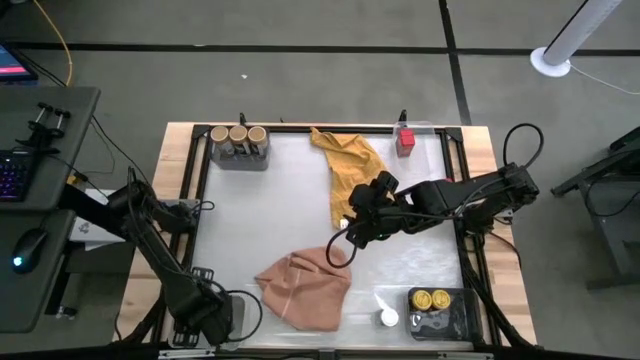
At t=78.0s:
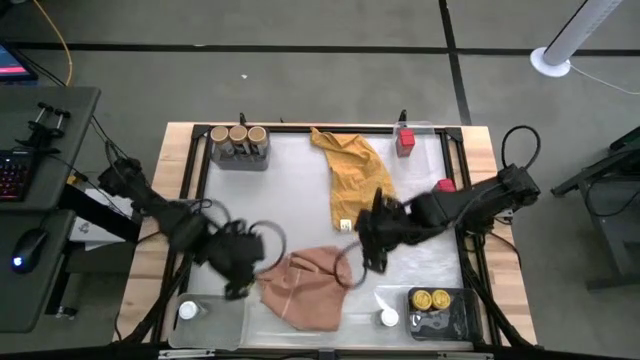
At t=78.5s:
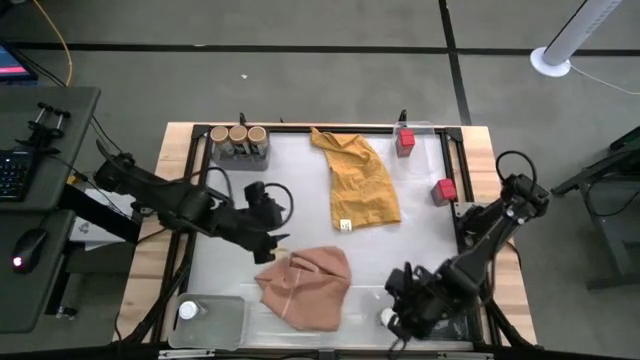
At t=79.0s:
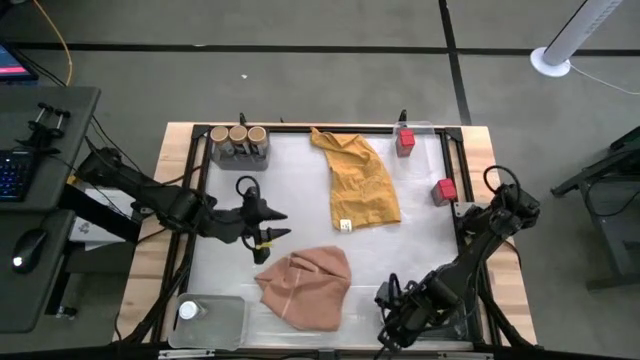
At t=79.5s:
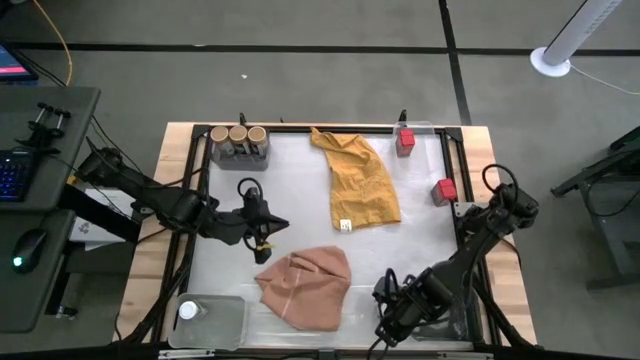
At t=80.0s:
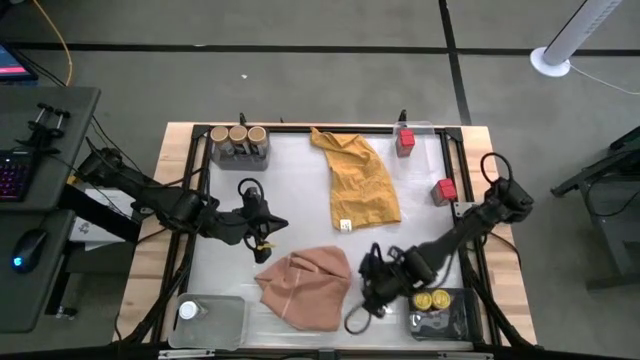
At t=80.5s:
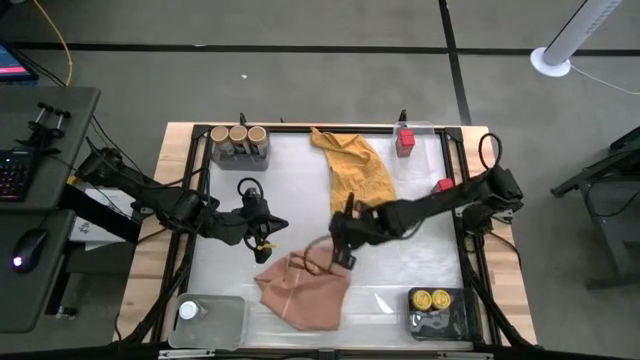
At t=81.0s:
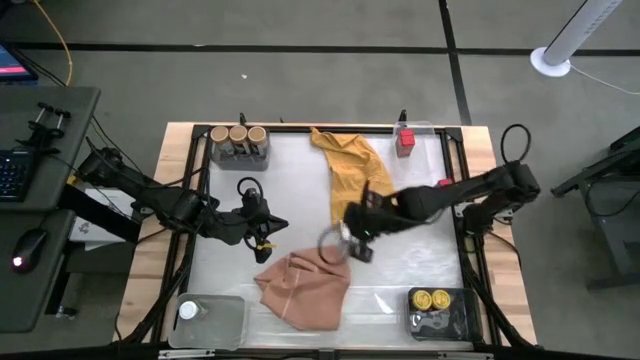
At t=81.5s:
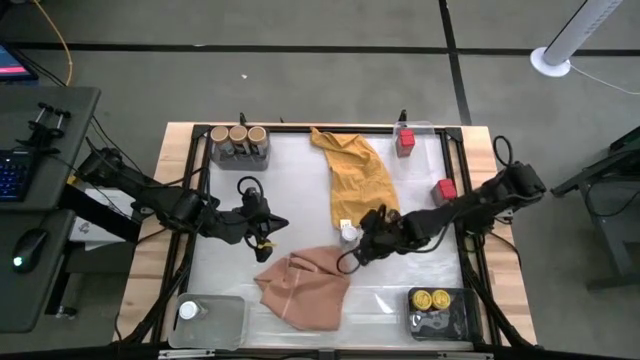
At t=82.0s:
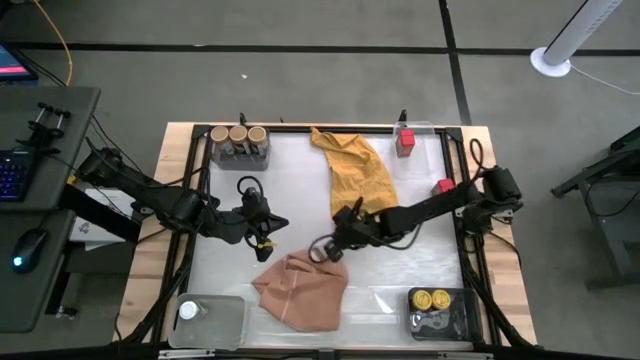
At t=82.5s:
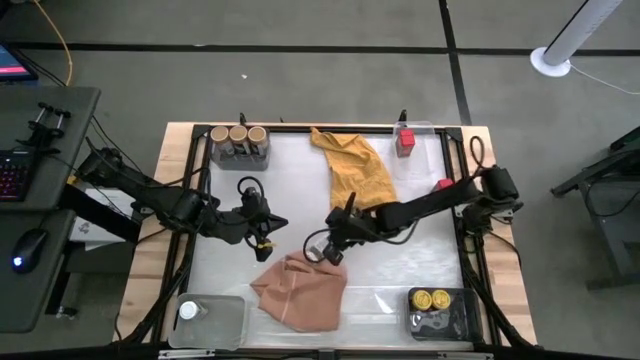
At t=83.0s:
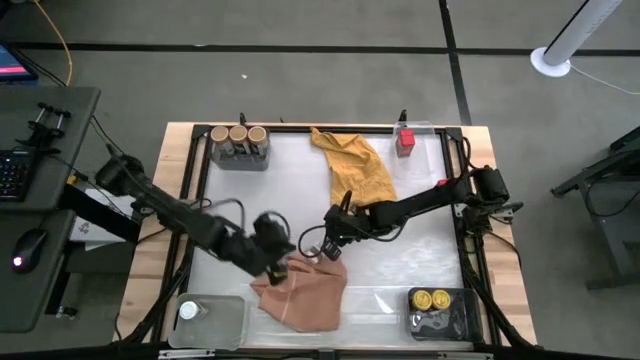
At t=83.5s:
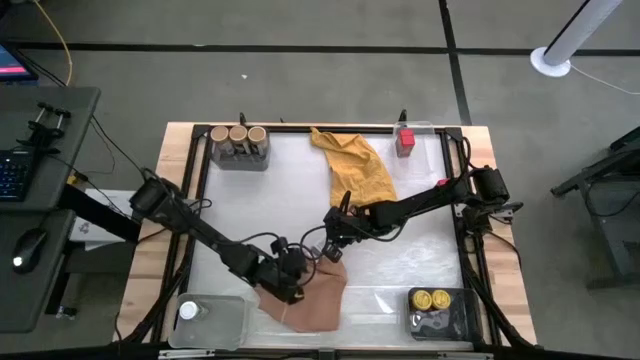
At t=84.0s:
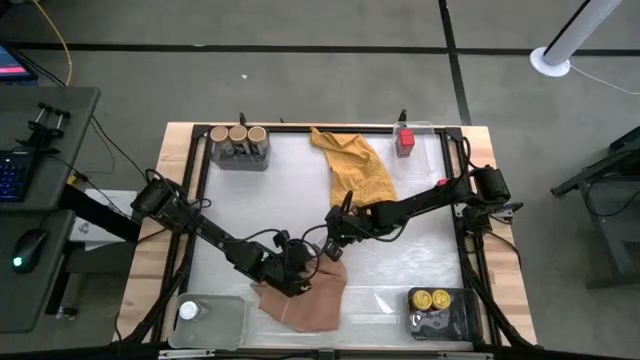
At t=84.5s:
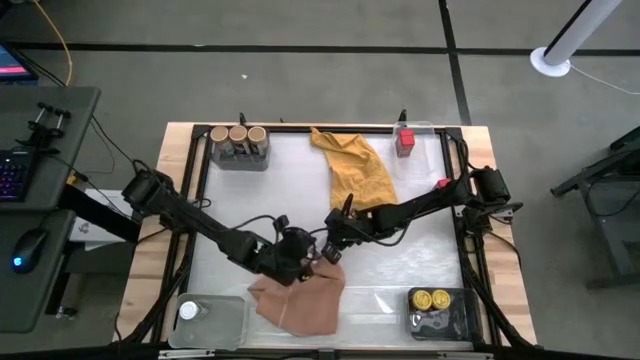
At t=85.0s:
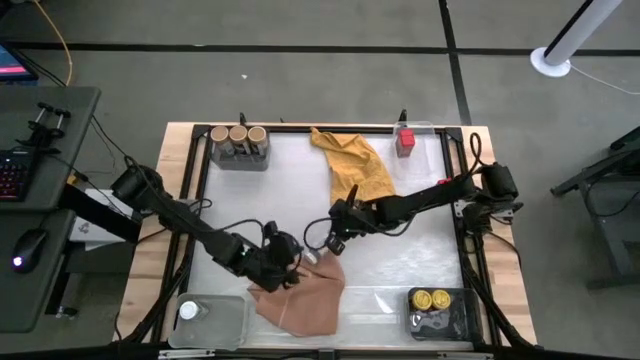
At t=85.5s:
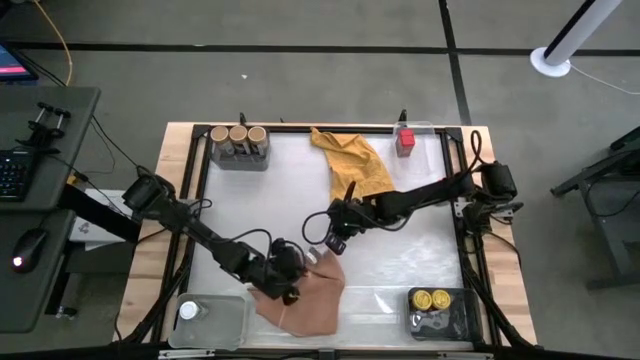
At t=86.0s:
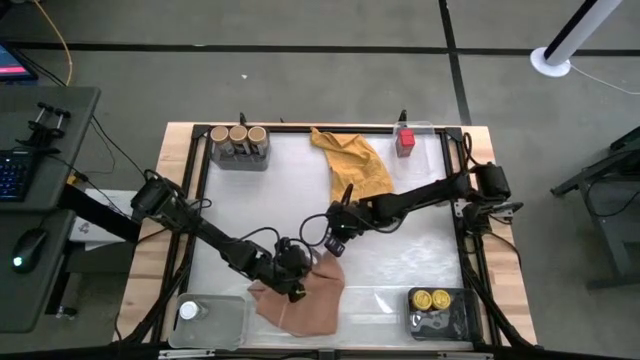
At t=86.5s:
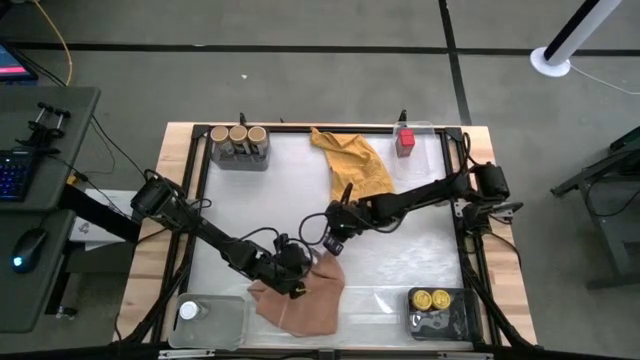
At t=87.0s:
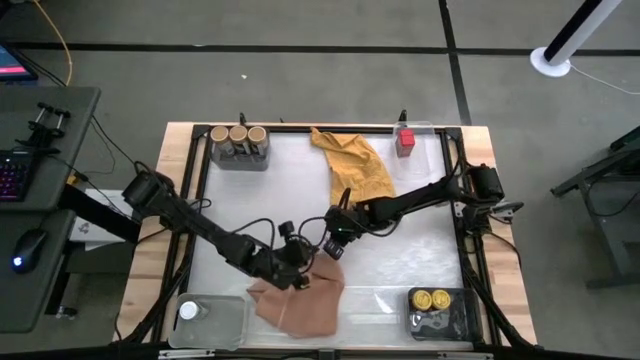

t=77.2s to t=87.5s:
Task: Sort spices by type
Put the white seasoning bottle into the gray bin

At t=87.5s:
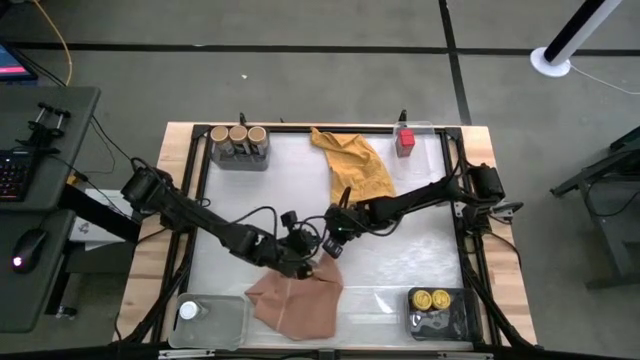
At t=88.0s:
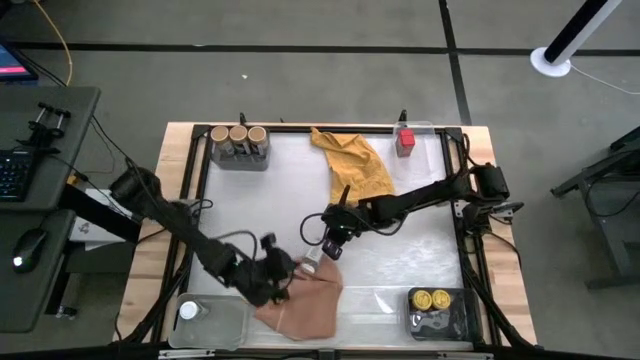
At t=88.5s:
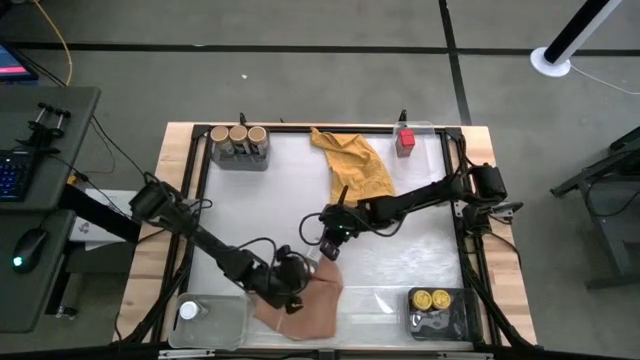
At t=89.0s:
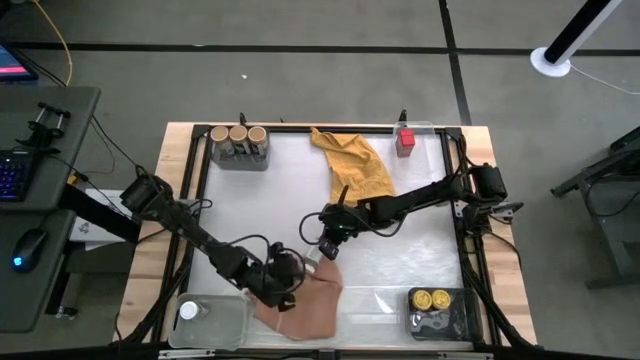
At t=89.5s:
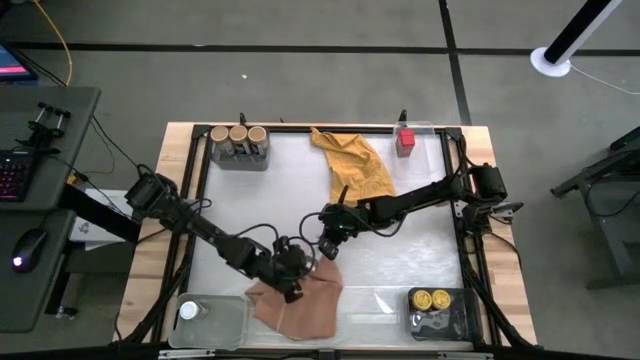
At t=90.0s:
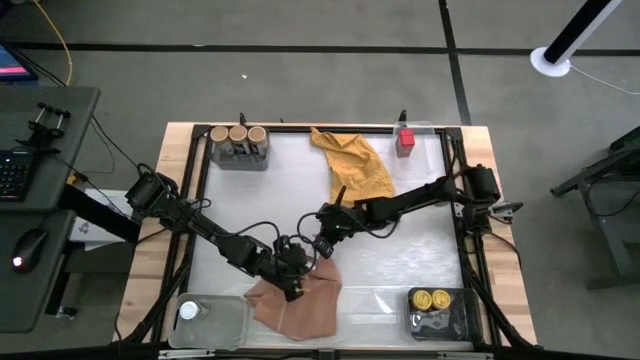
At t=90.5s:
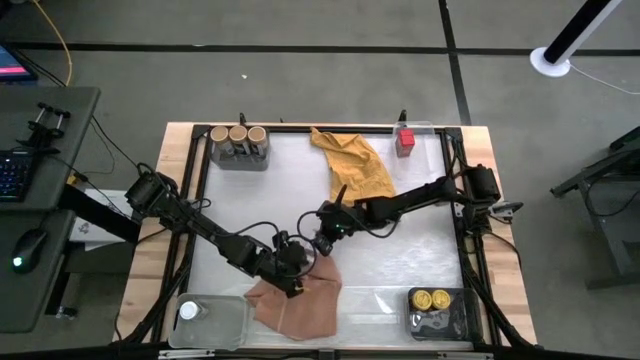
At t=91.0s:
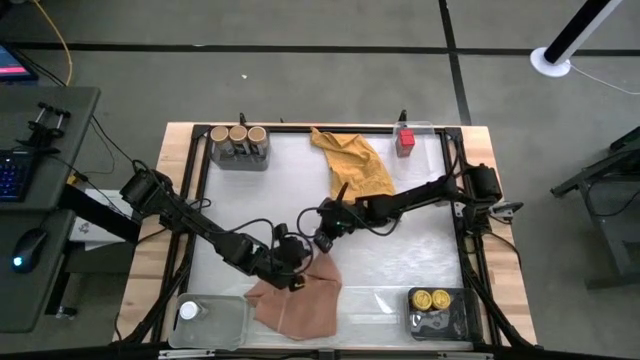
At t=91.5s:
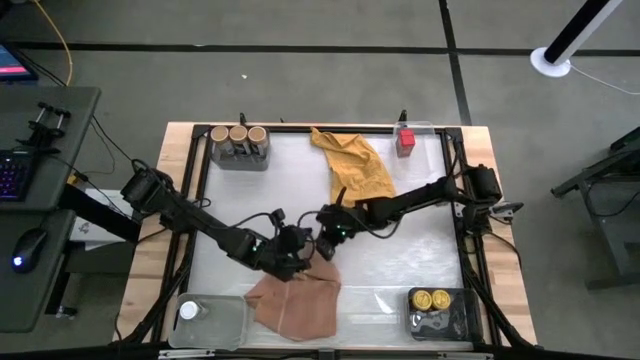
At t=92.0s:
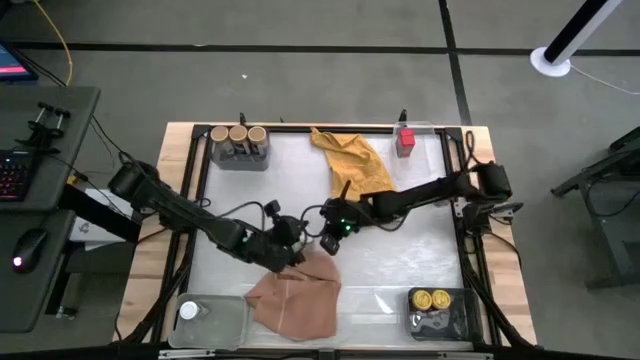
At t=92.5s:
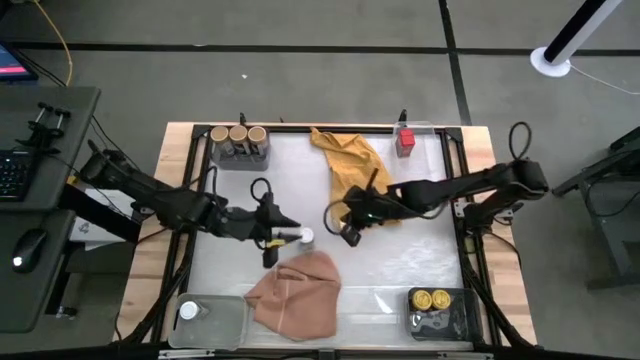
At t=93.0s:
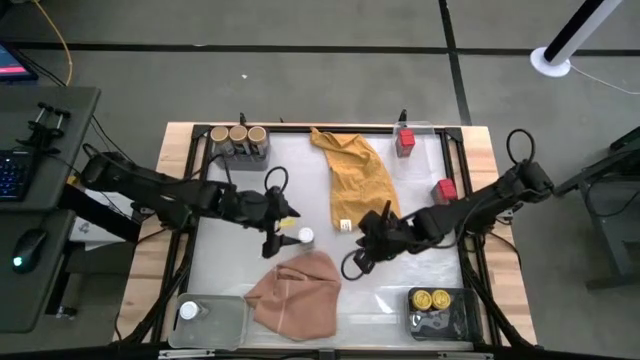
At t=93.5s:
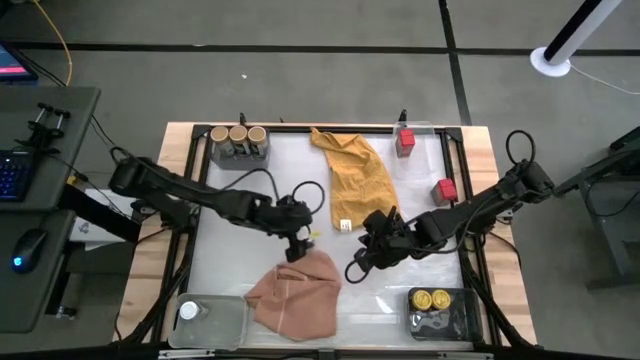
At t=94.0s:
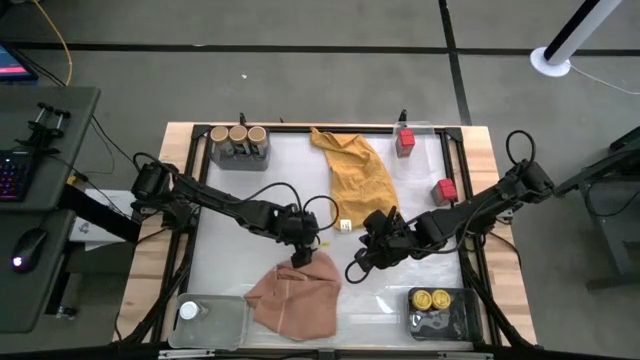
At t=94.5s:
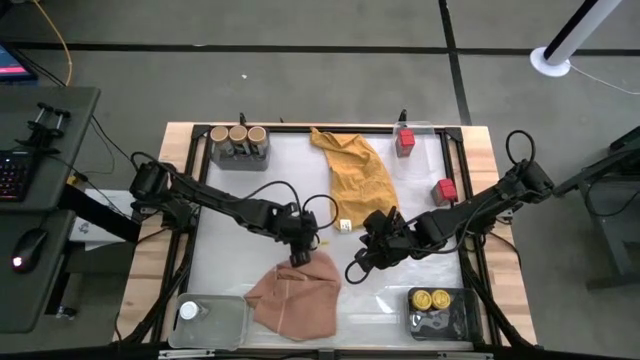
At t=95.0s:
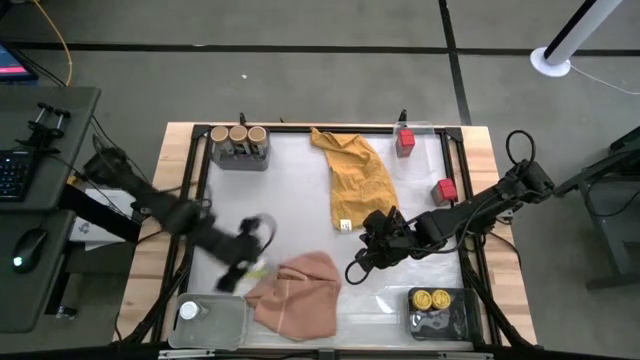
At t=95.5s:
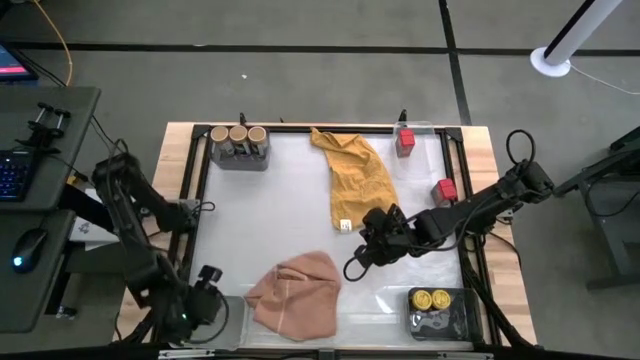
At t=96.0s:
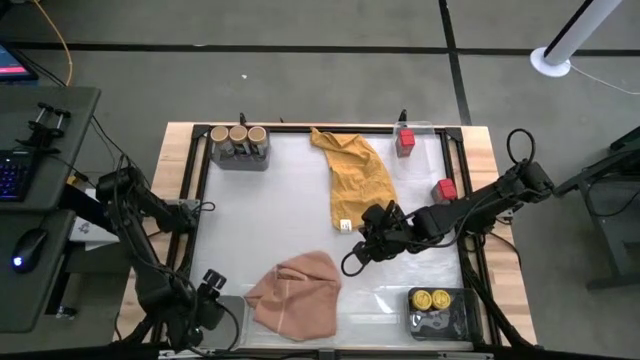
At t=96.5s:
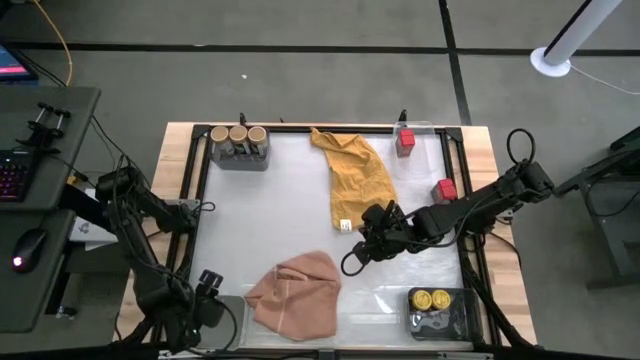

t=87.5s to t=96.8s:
Put the white seasoning bottle into the gray bin

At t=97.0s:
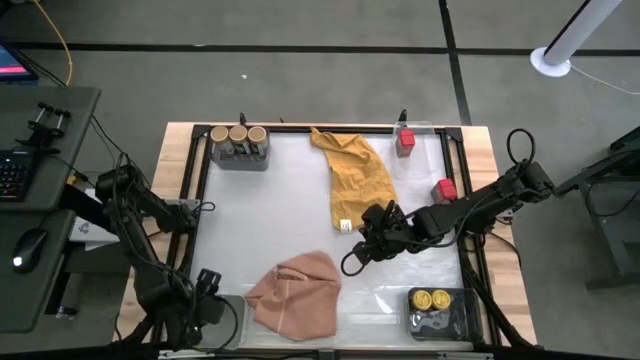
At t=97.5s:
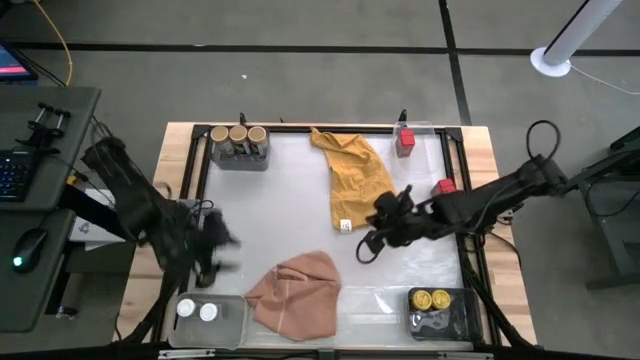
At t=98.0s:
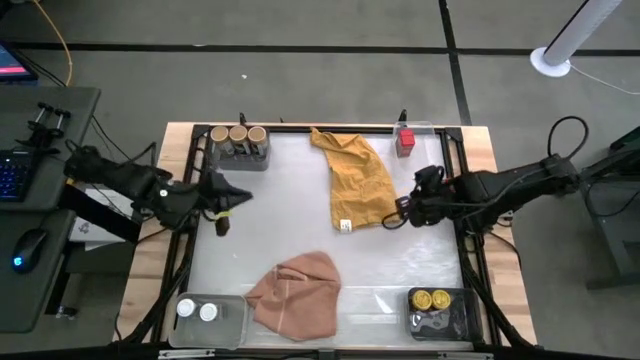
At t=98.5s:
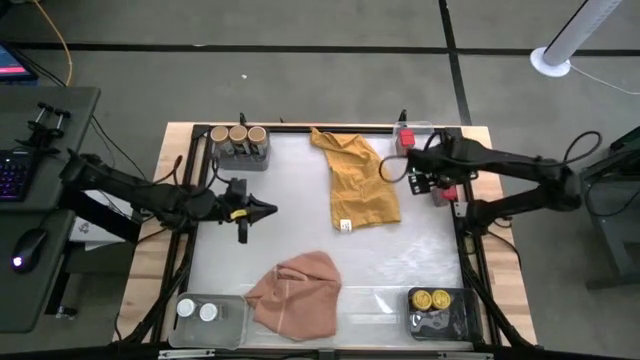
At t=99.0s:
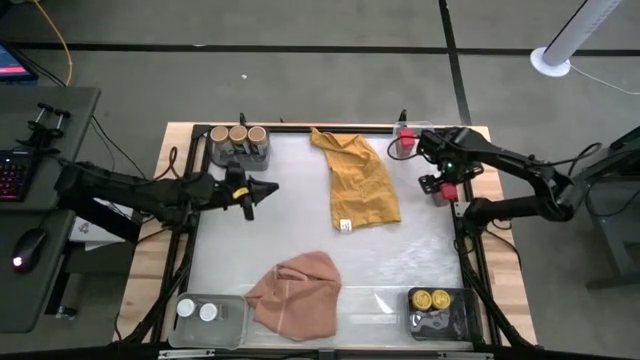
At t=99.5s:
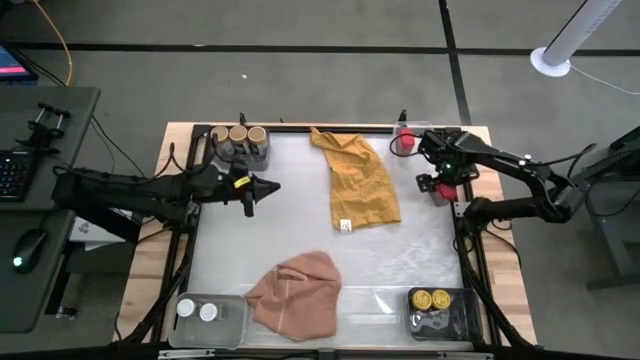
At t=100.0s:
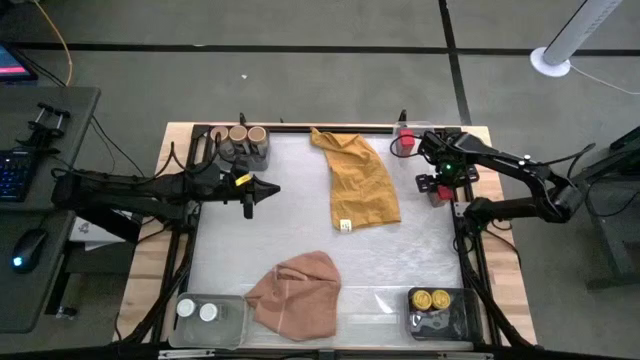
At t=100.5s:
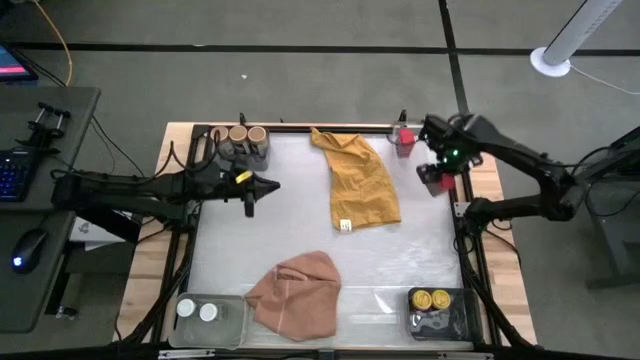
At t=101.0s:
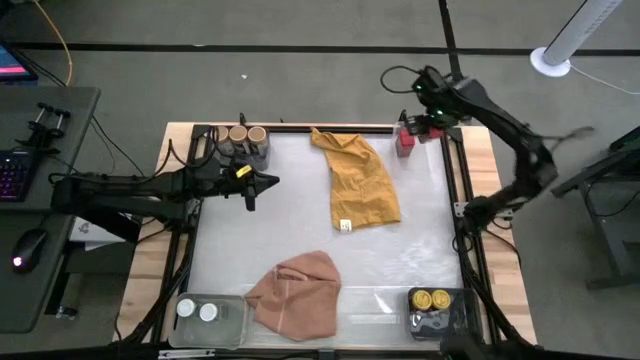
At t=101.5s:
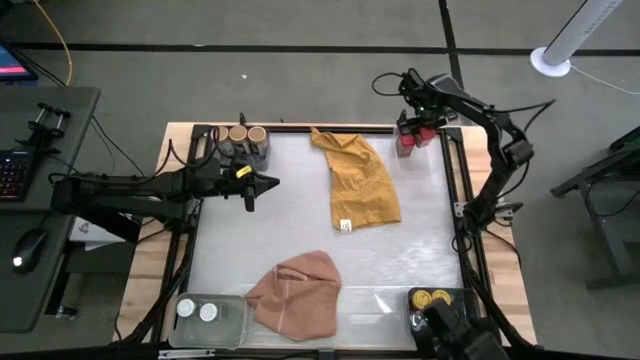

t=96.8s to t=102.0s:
Put the red seasoning bottle into the transparent bin
